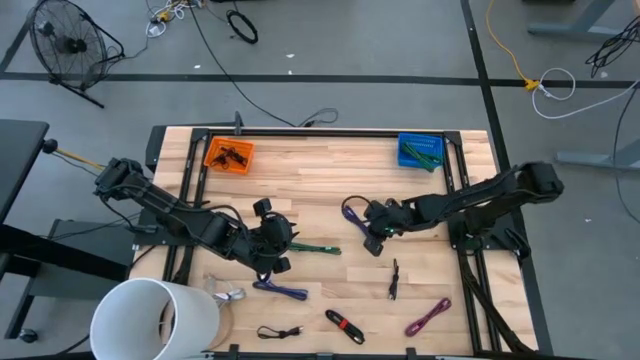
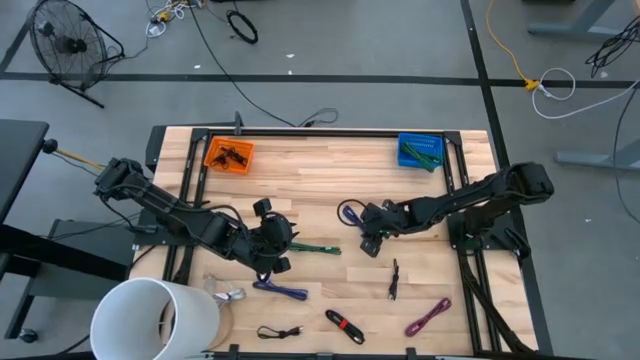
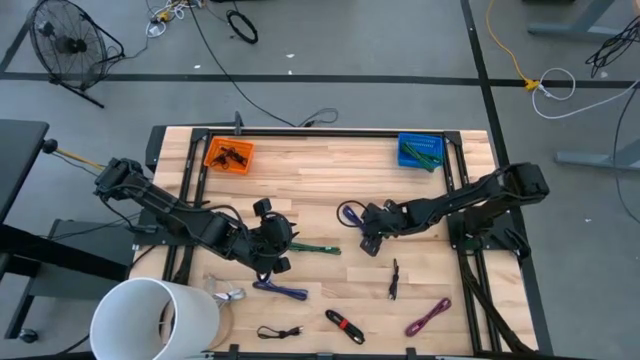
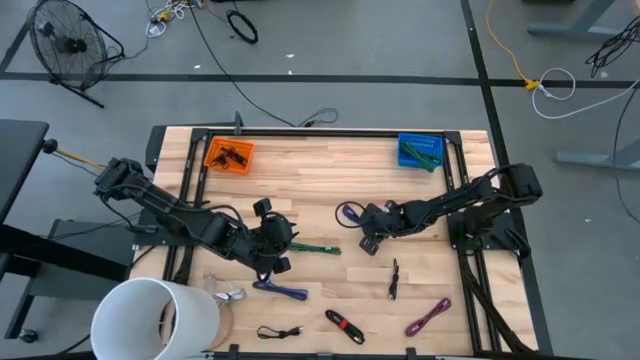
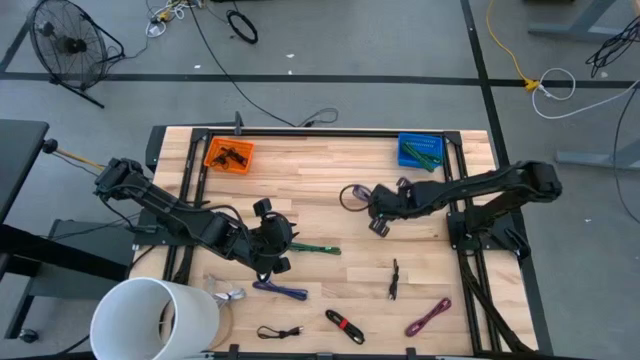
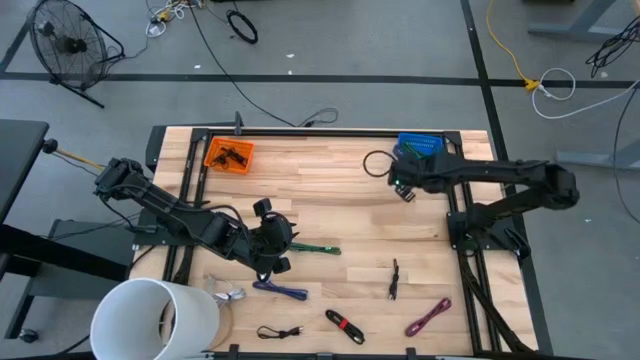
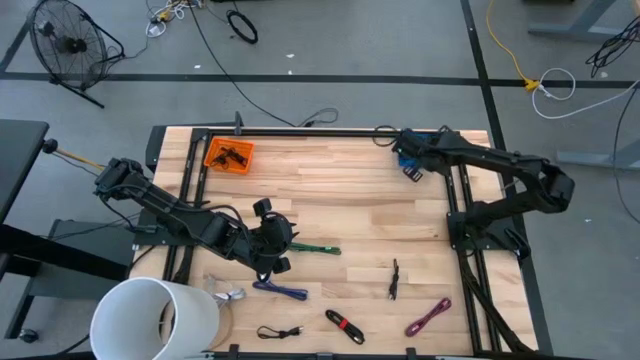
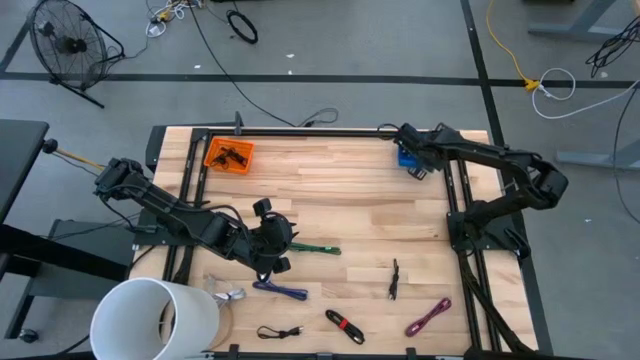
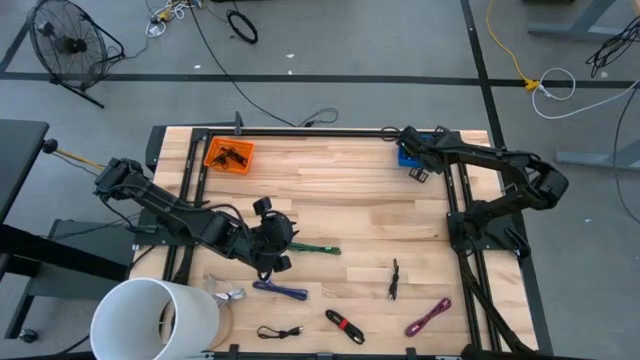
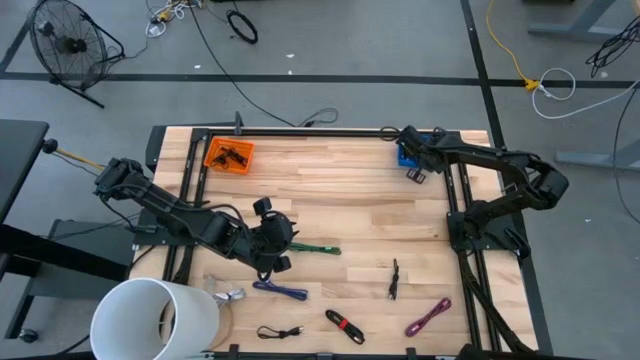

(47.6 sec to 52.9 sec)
Task: Pick & Place USB Port
Put the blue charger cable into the blue bin

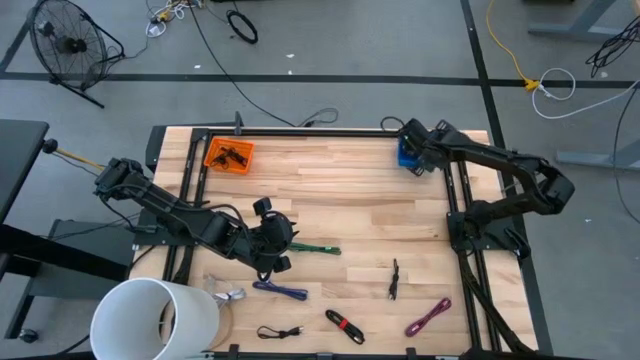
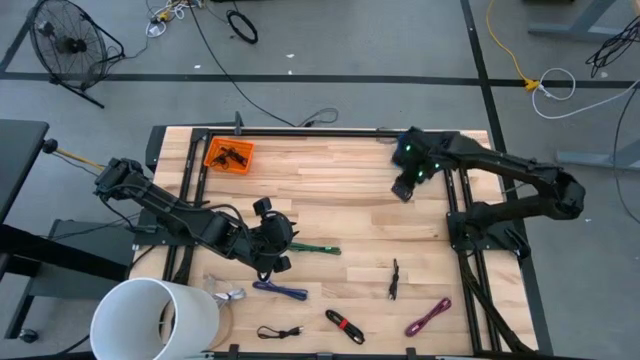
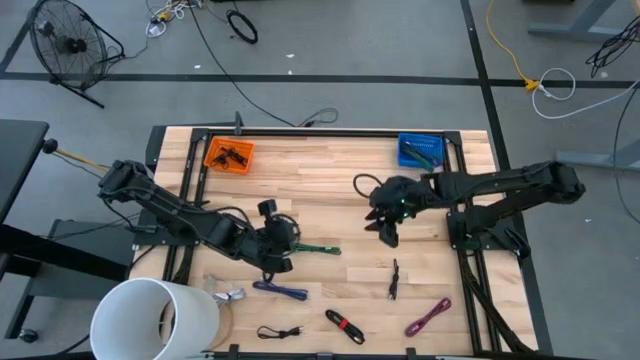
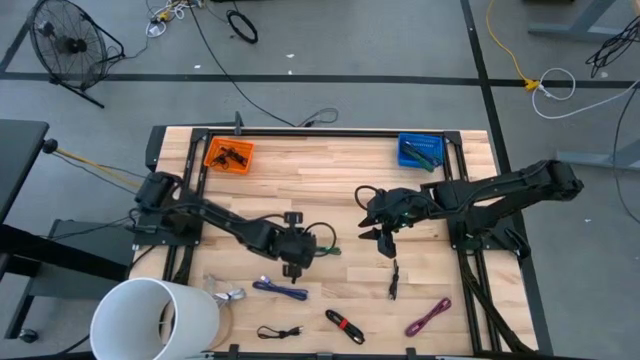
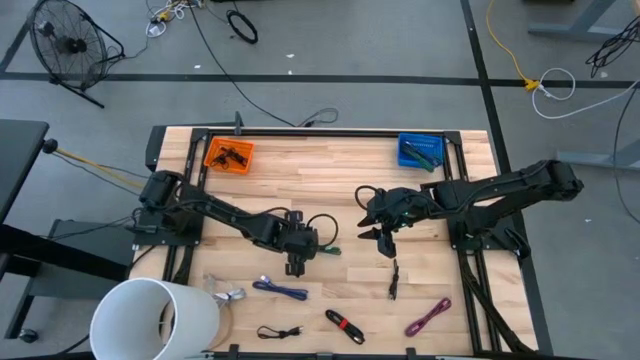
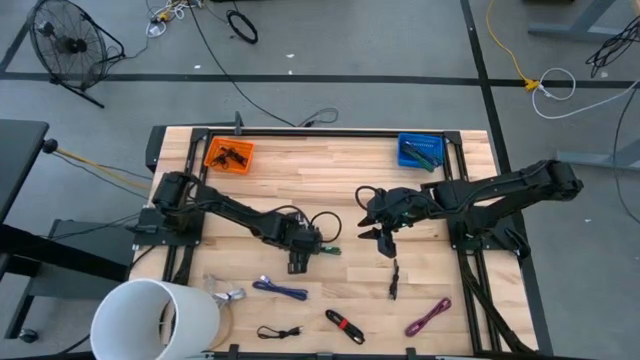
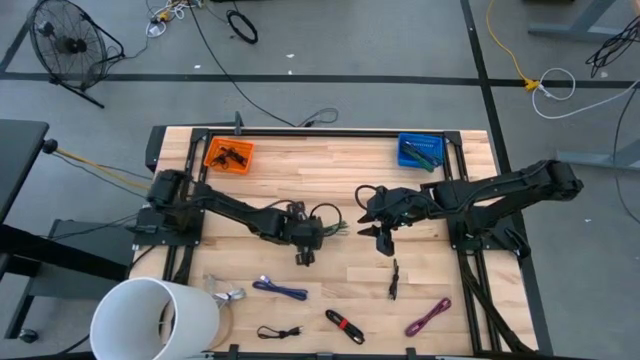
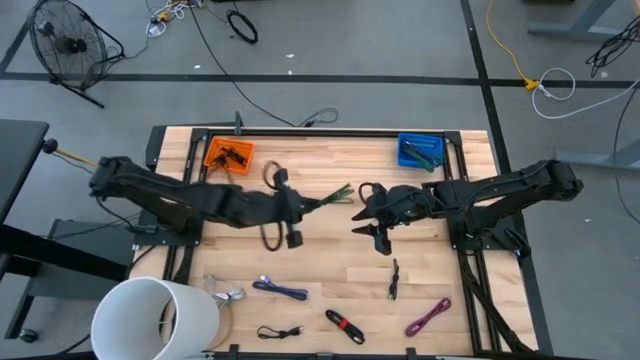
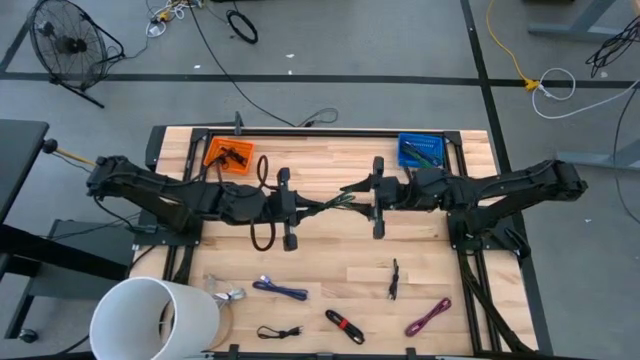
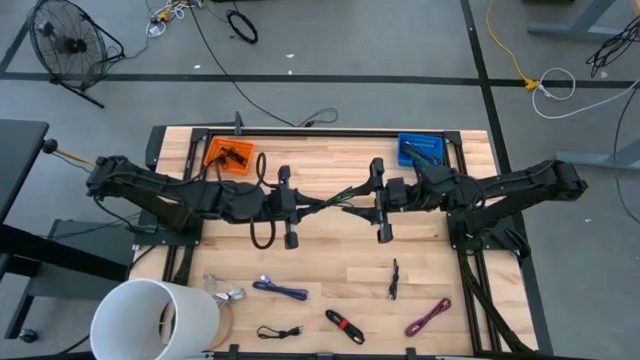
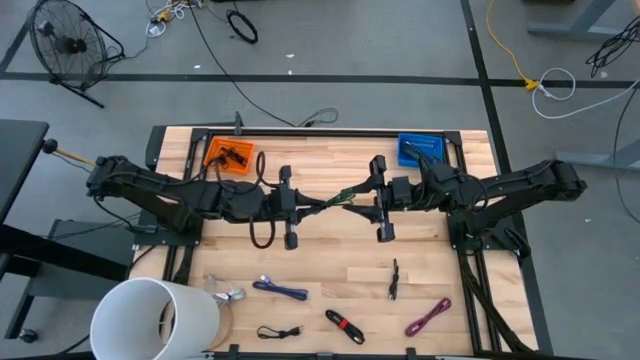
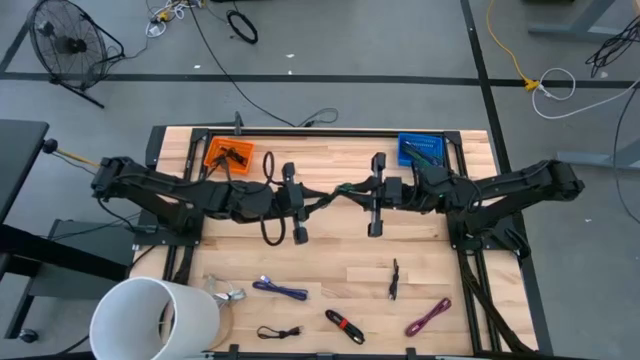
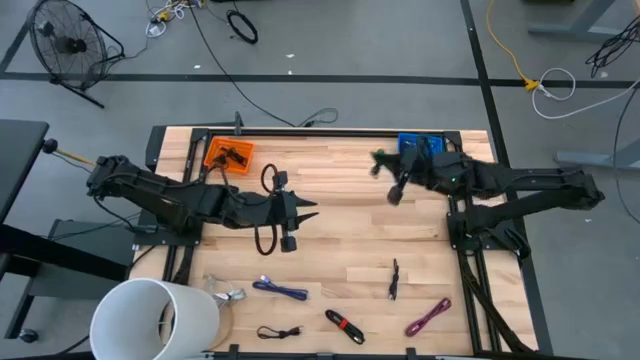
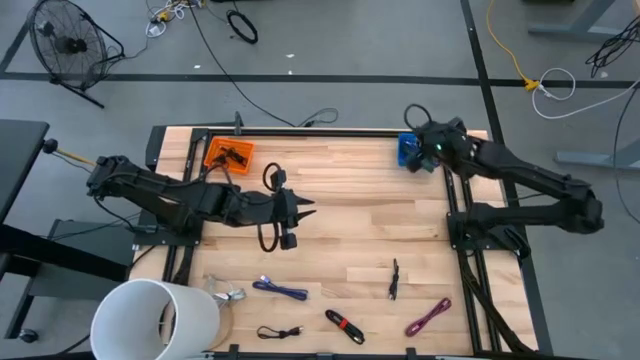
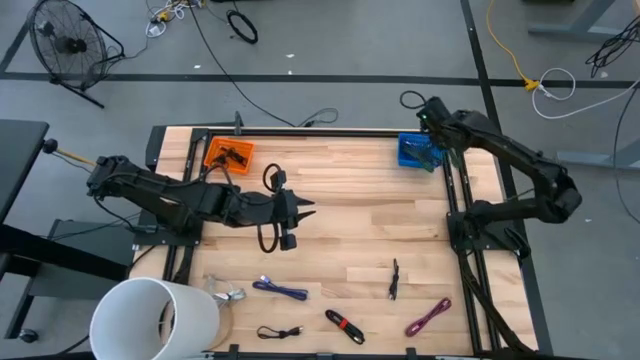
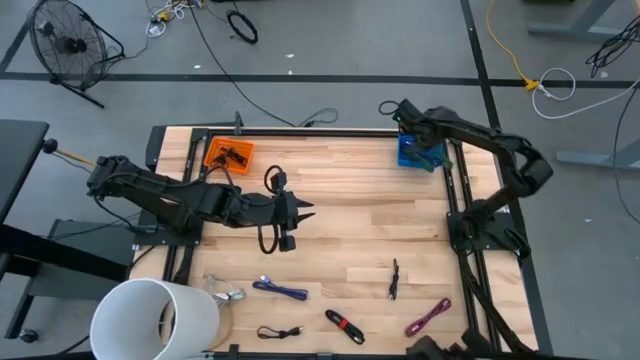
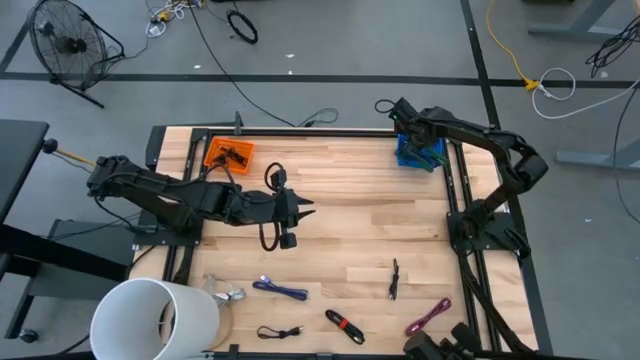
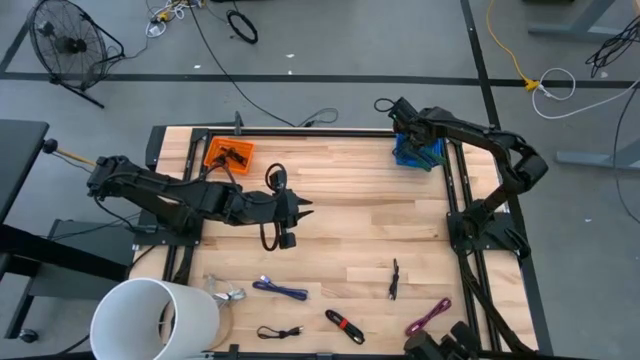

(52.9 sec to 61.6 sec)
Put the green charger cable into the blue bin

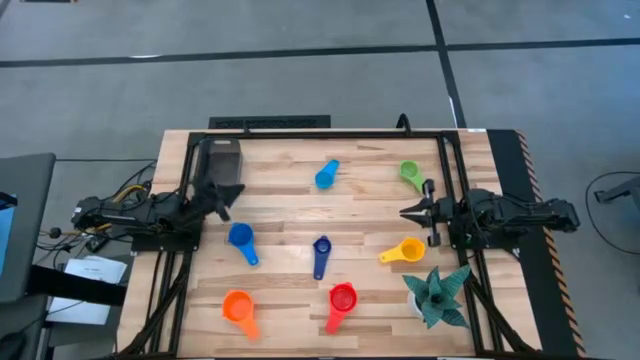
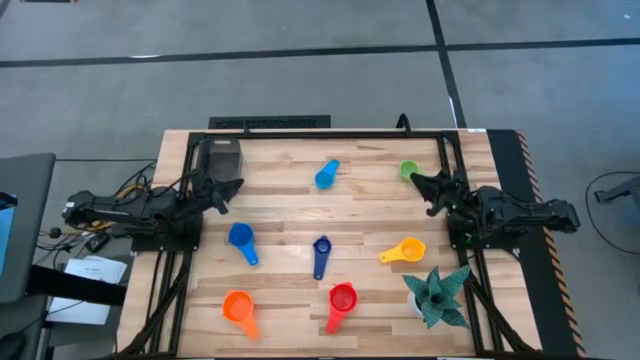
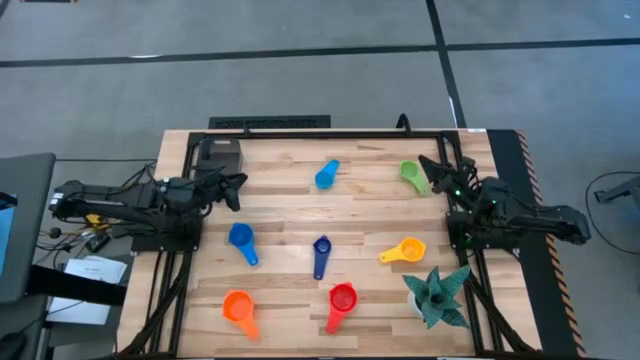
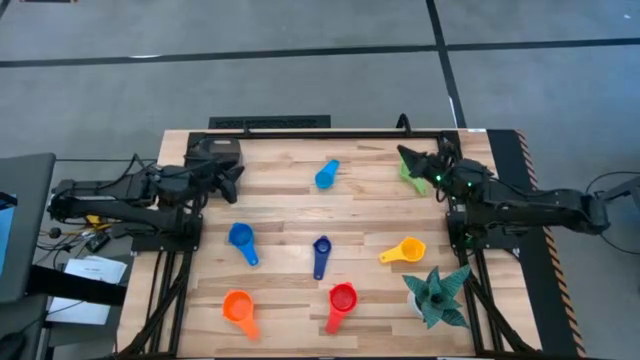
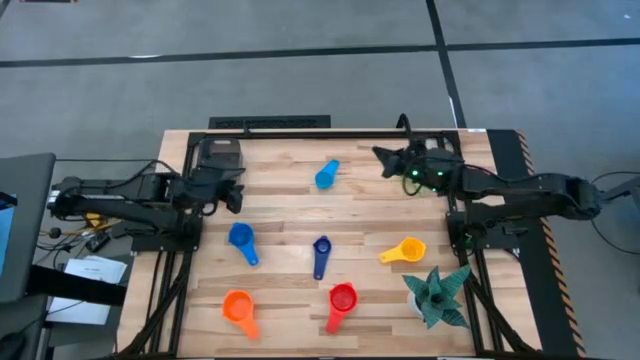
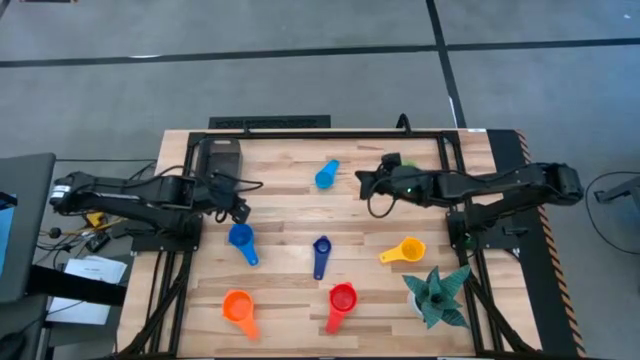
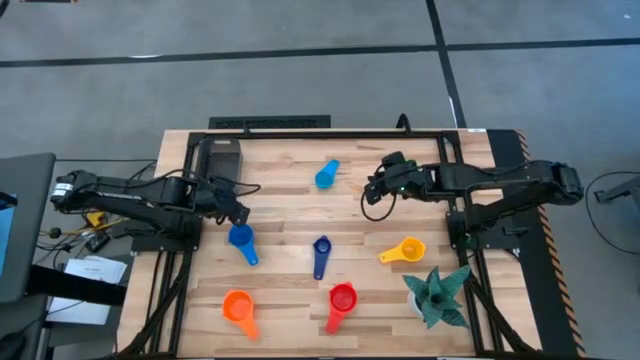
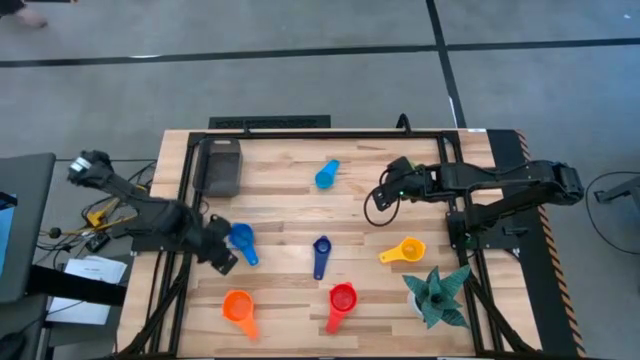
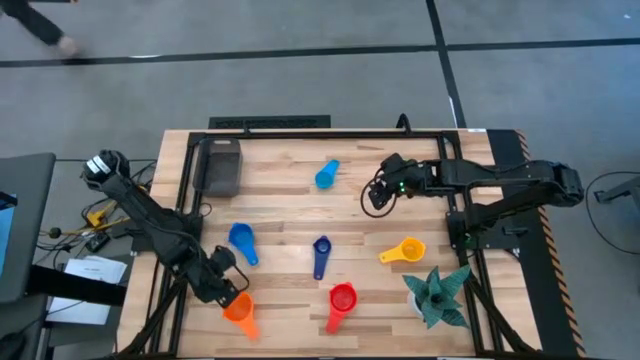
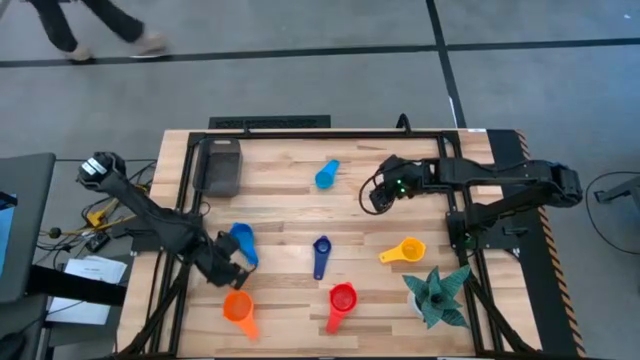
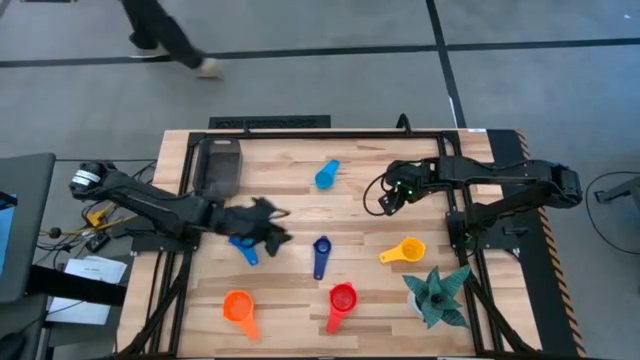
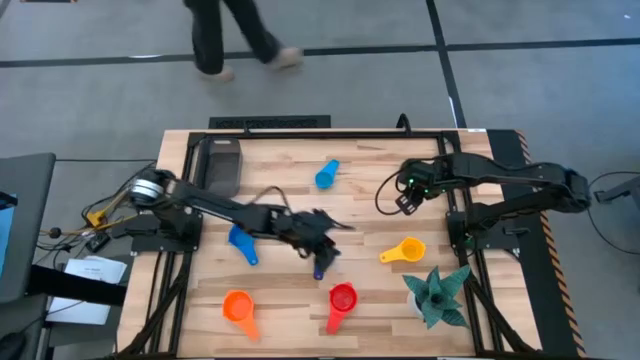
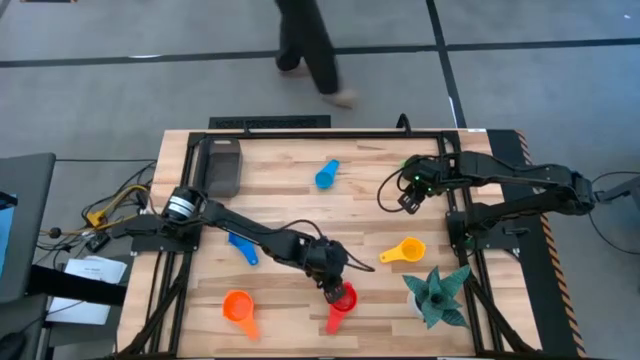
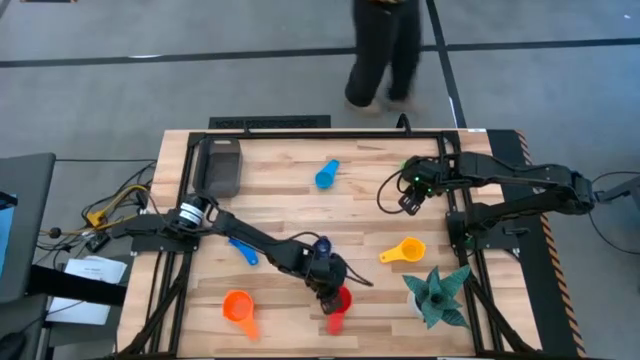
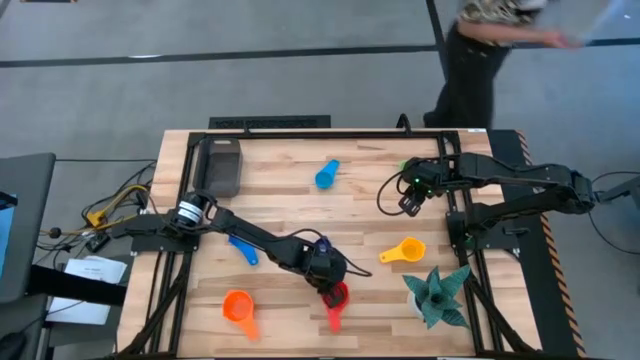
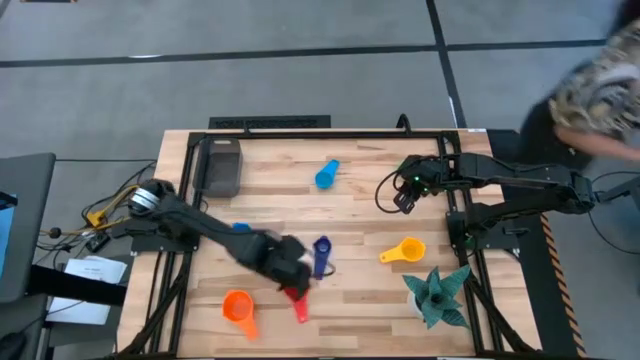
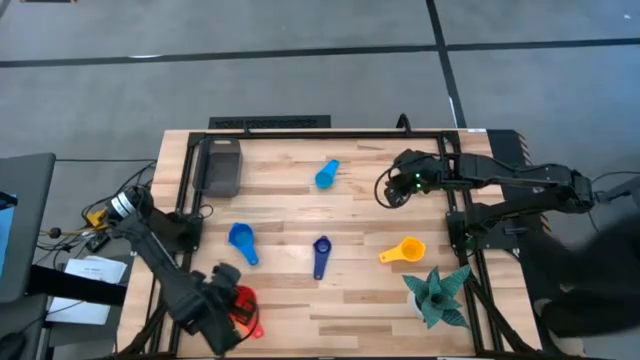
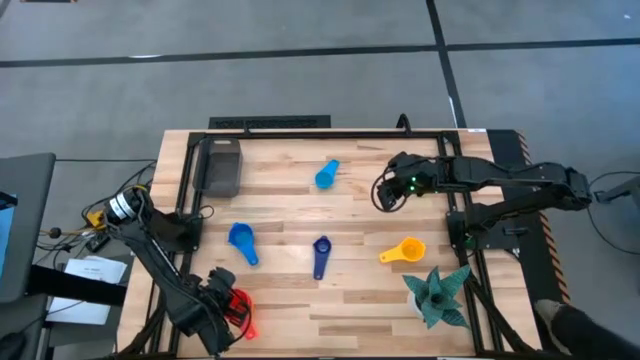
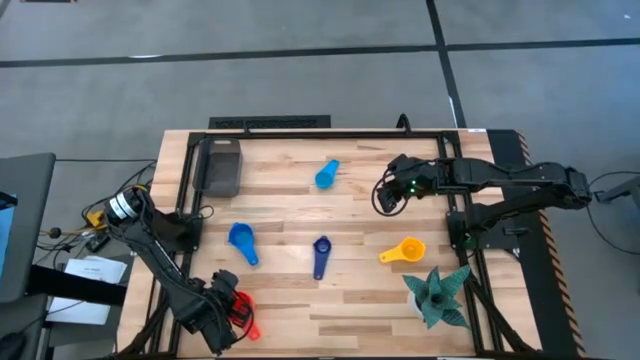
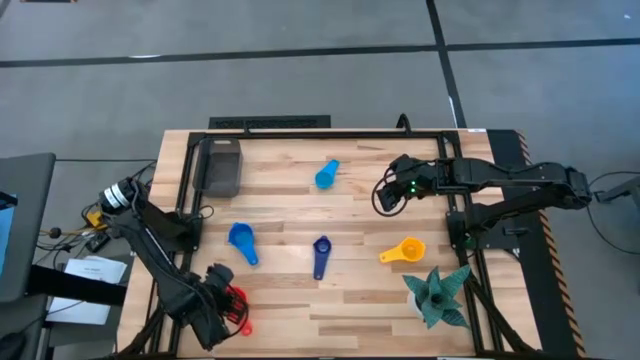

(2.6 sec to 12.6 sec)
Task: Nest measuring cups in basket
Stack the red measuring cup on top of the orange measuring cup
